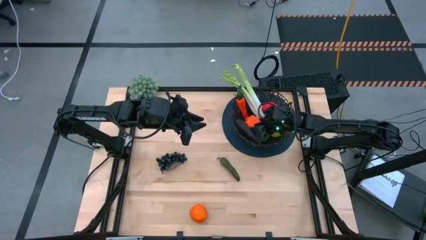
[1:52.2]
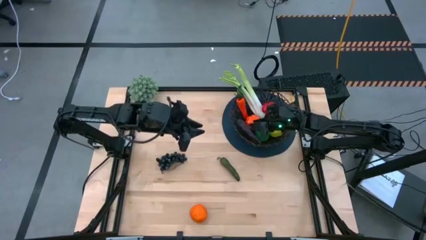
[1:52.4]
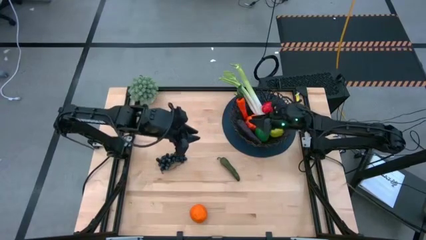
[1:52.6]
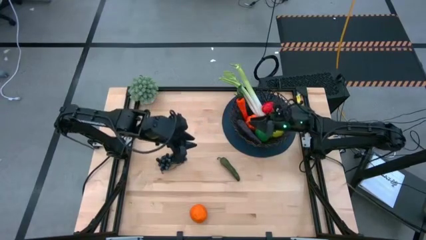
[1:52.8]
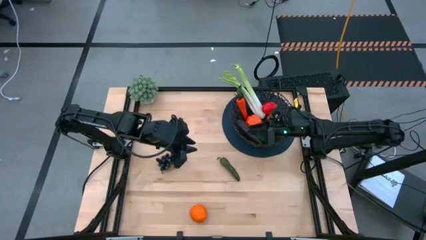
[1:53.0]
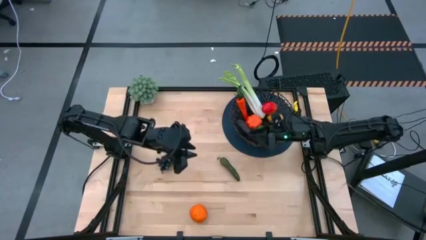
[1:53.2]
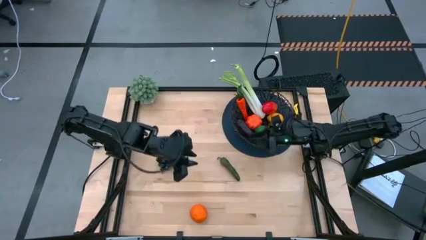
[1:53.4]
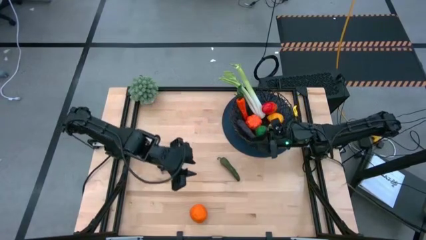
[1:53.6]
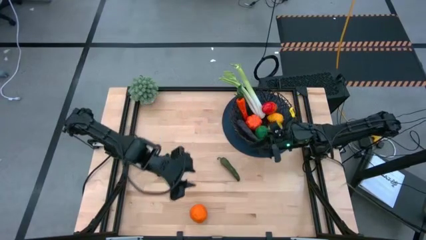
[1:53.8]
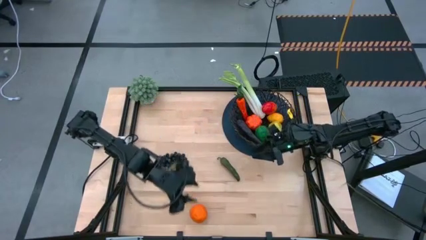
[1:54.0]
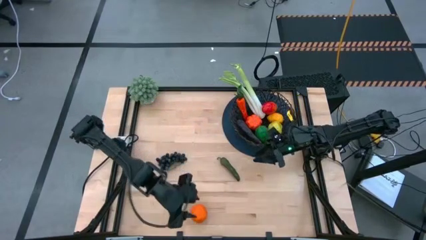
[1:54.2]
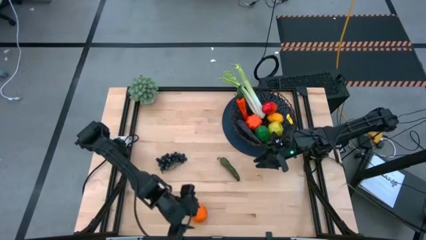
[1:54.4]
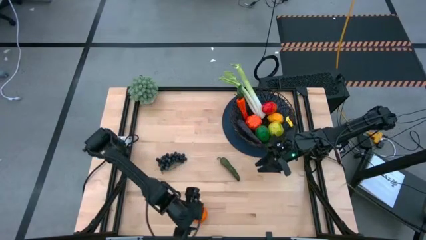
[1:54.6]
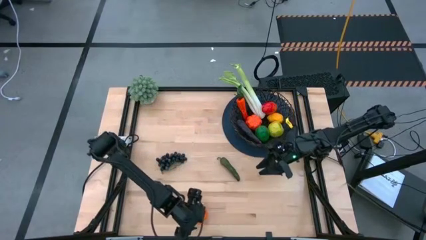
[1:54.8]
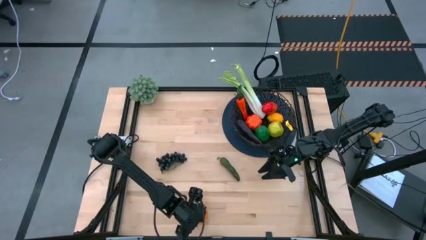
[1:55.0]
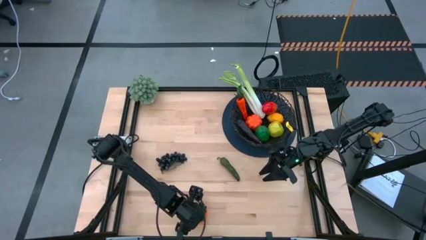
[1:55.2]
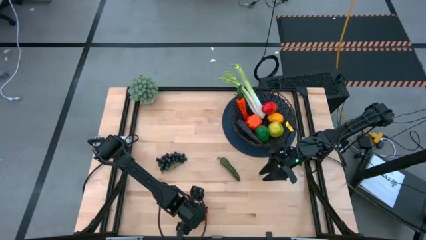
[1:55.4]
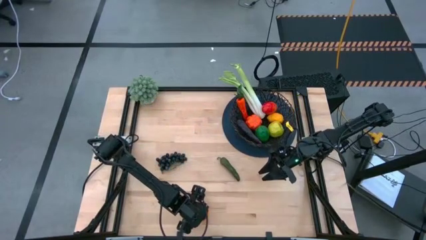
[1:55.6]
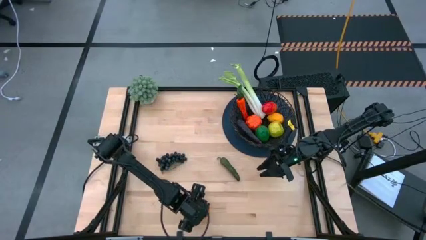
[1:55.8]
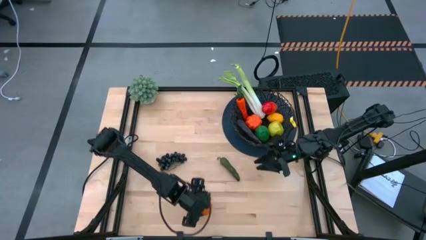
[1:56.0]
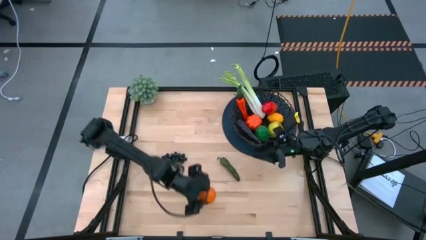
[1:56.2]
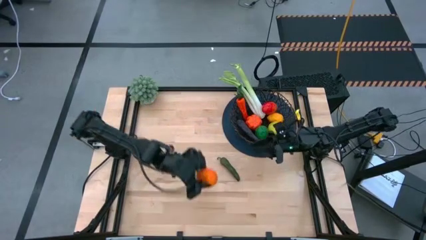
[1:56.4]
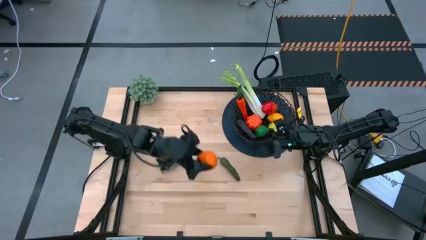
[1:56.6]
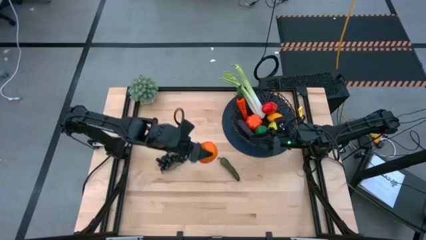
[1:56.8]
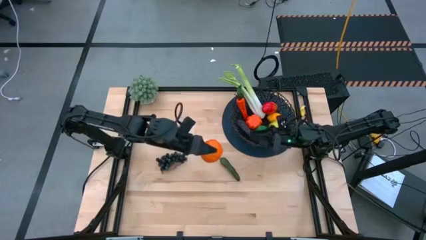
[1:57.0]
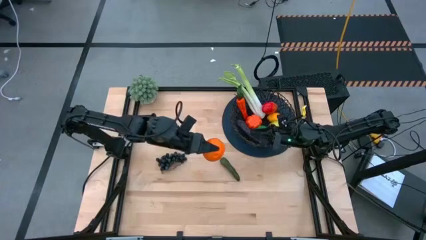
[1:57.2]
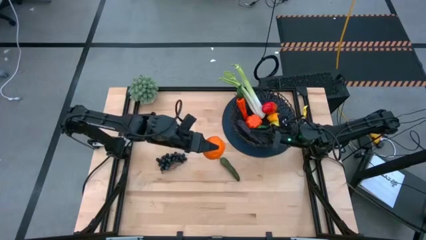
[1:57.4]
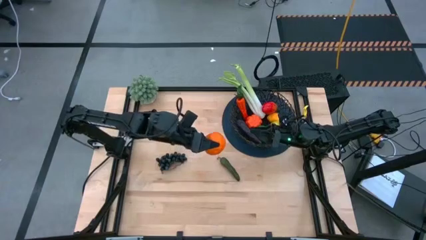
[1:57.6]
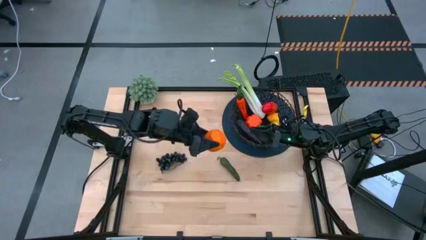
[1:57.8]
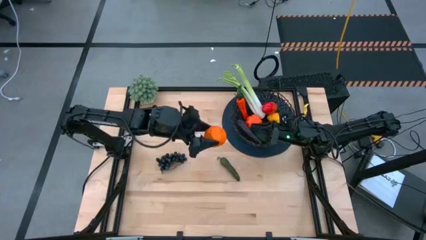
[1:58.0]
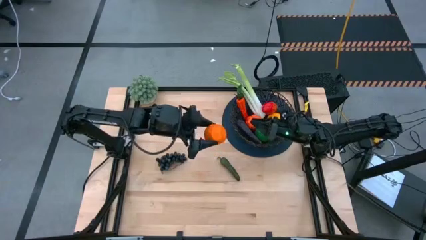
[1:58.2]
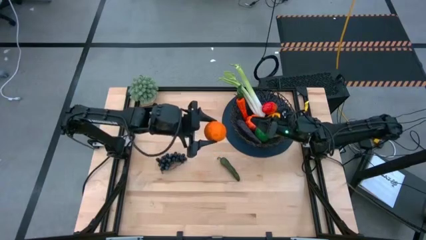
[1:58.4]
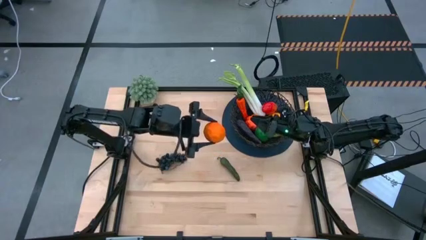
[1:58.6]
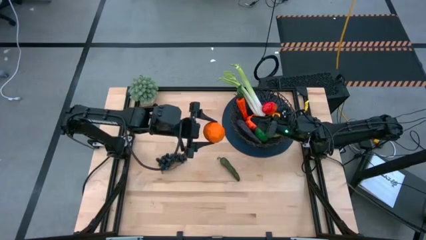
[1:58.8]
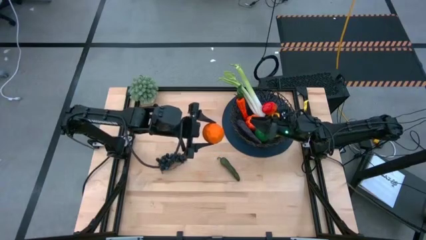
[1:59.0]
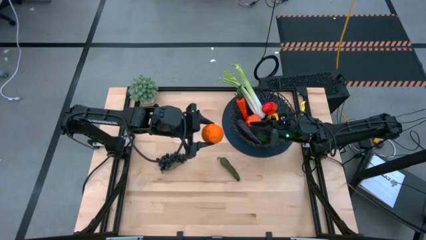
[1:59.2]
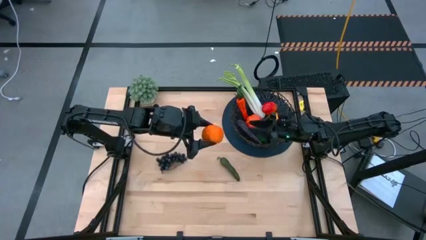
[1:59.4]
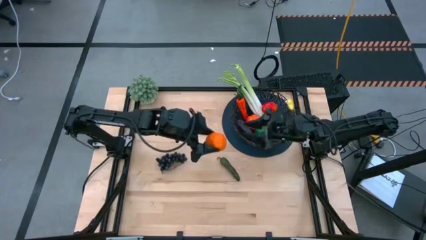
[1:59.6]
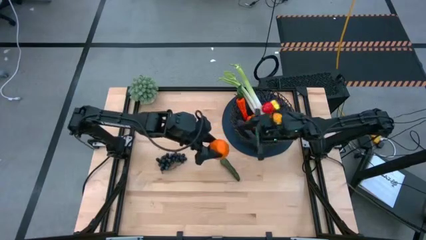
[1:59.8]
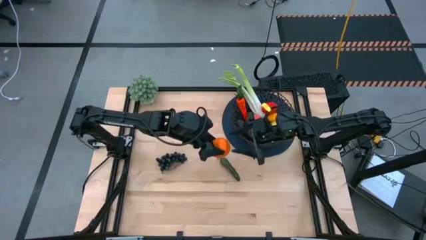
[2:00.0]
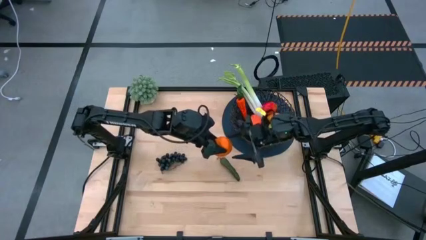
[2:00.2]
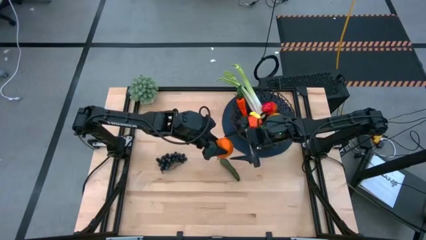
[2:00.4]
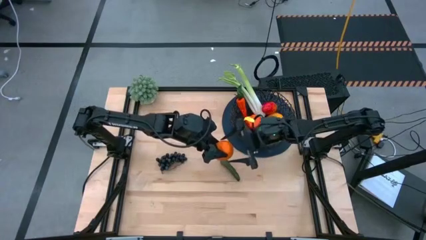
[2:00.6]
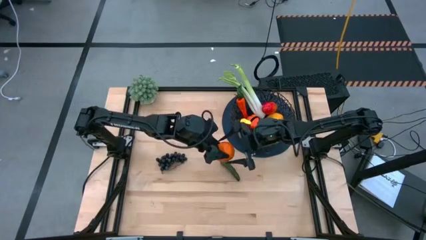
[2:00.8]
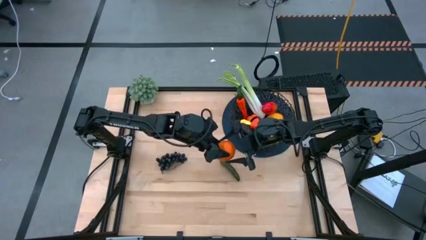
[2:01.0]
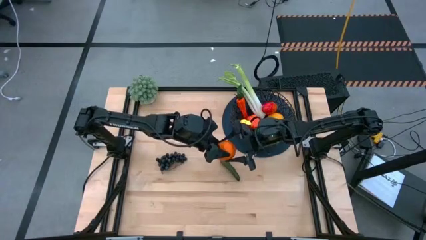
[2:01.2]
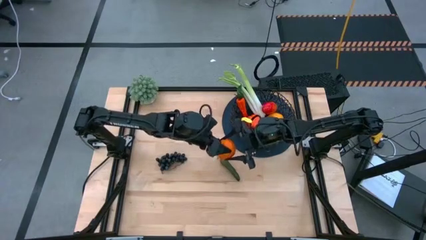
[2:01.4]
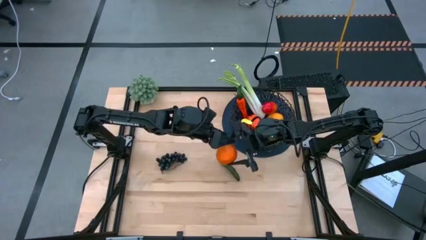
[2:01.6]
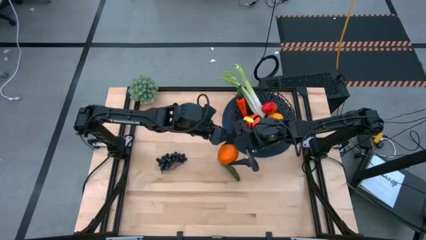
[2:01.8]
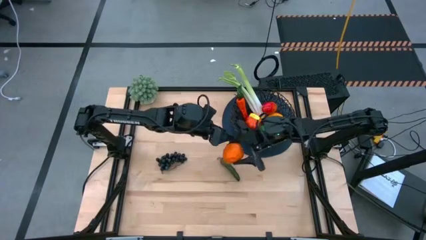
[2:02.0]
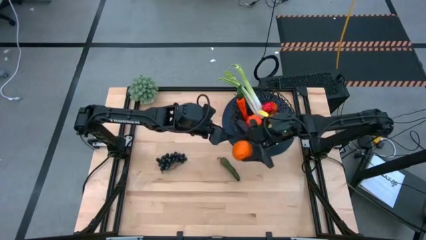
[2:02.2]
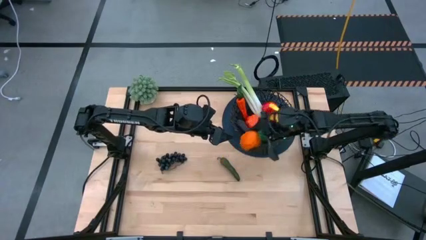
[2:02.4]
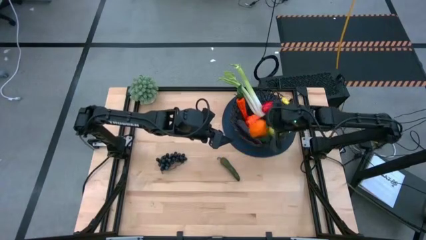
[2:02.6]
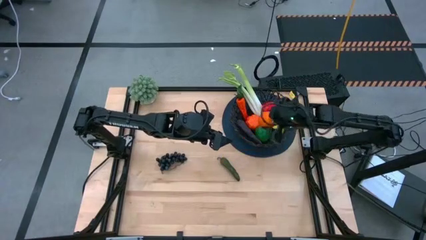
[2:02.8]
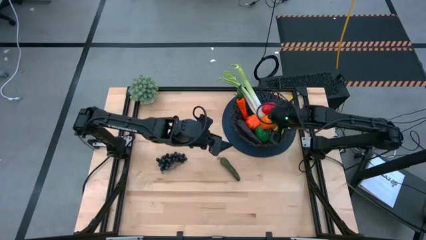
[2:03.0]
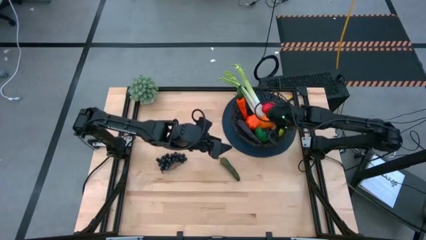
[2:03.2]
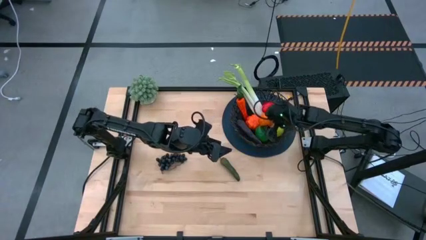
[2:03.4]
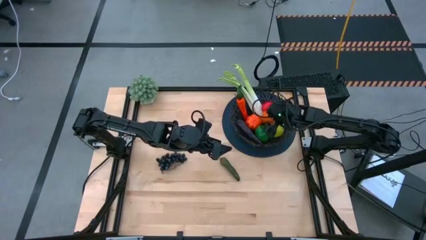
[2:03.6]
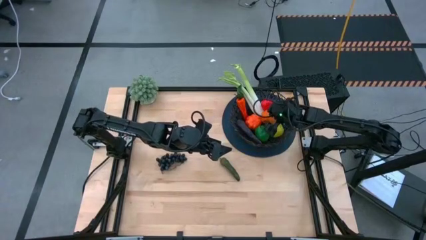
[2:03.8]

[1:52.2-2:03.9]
Task: Build produce basket
Put the orange into the black woven basket
